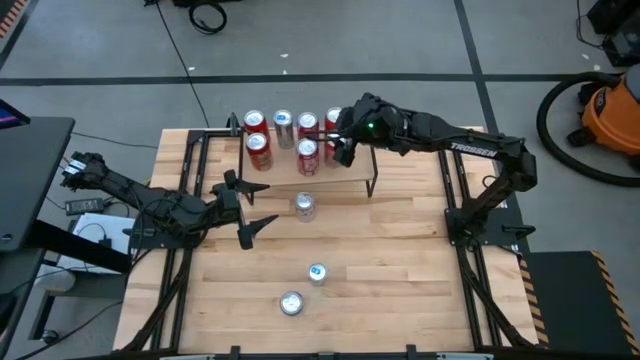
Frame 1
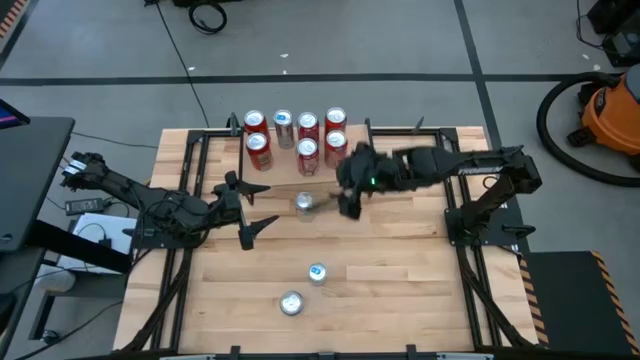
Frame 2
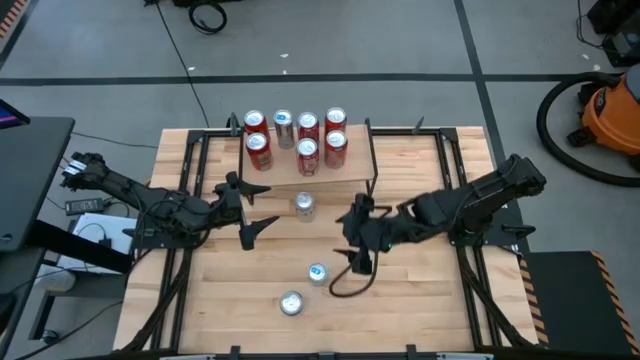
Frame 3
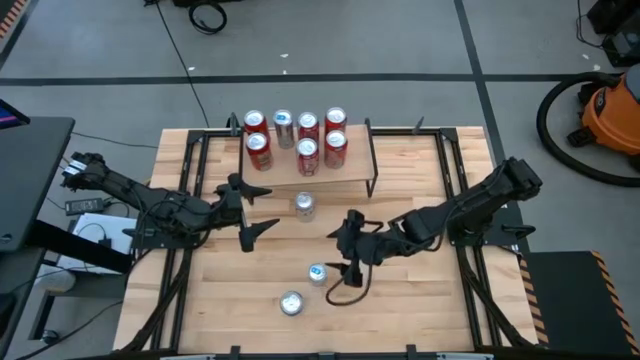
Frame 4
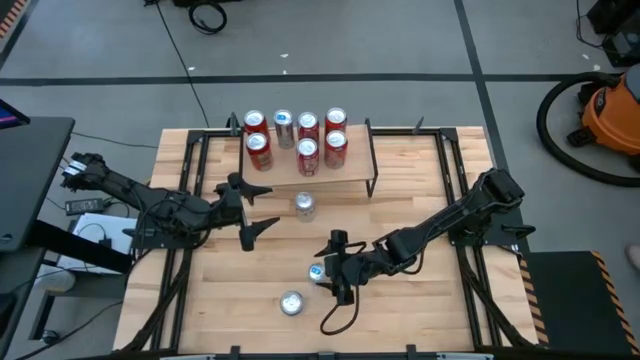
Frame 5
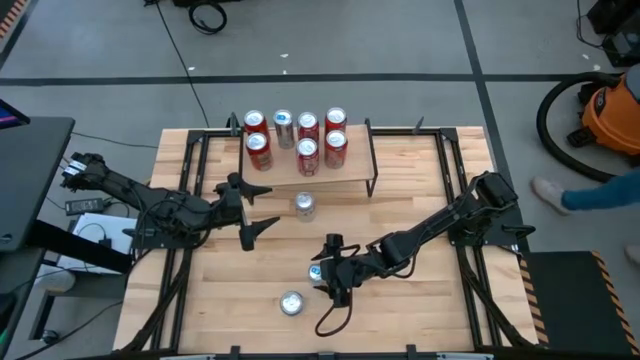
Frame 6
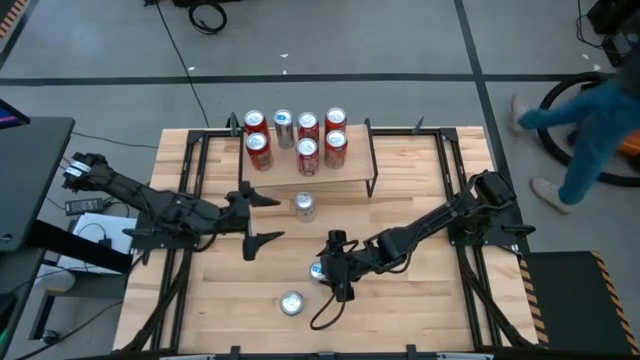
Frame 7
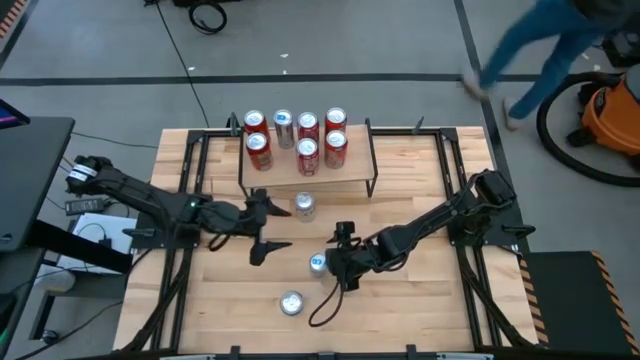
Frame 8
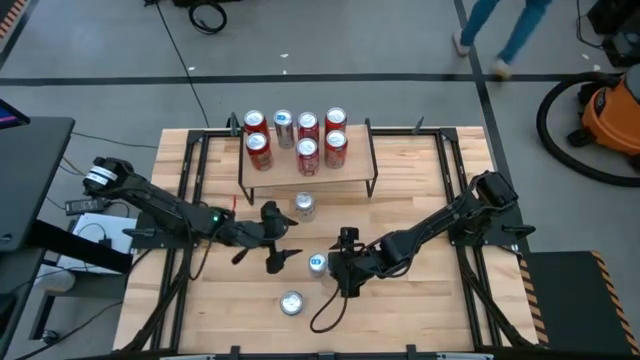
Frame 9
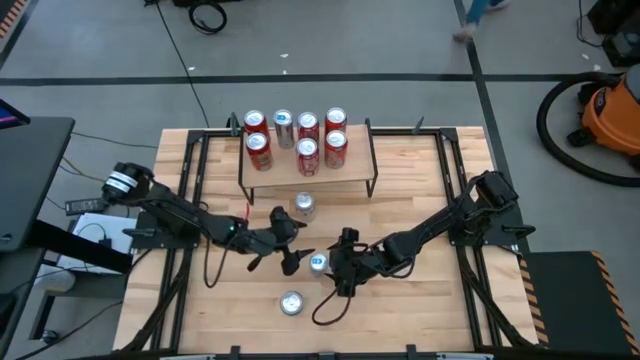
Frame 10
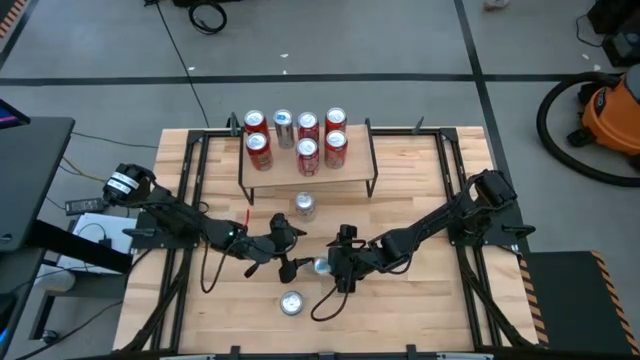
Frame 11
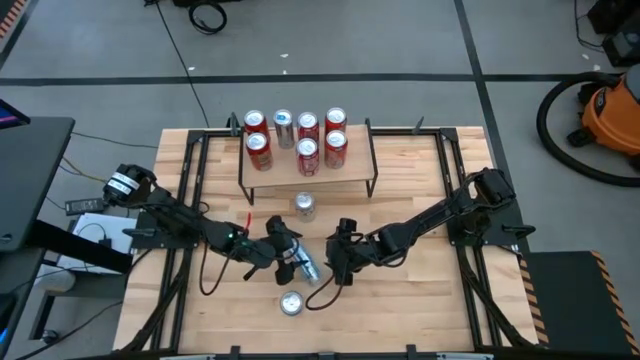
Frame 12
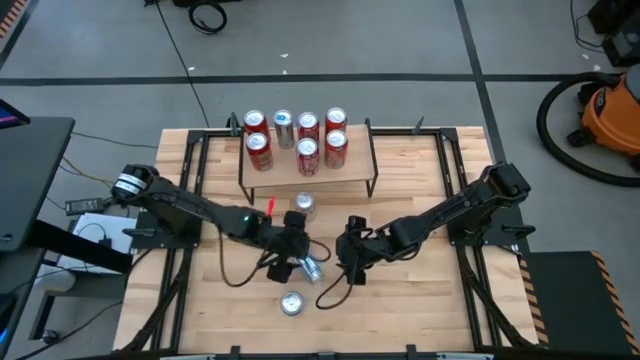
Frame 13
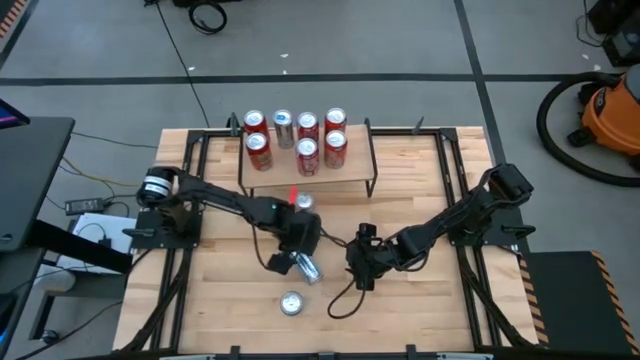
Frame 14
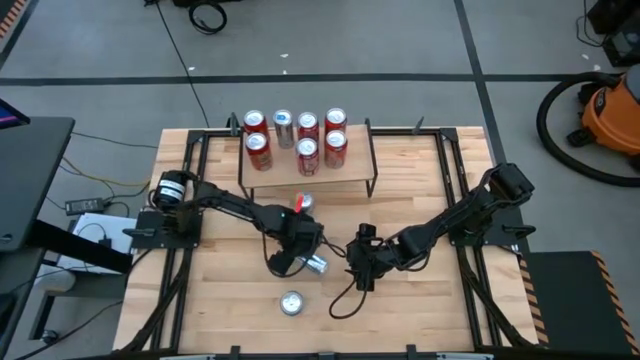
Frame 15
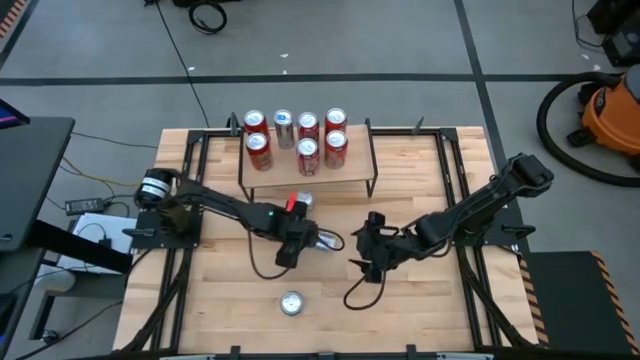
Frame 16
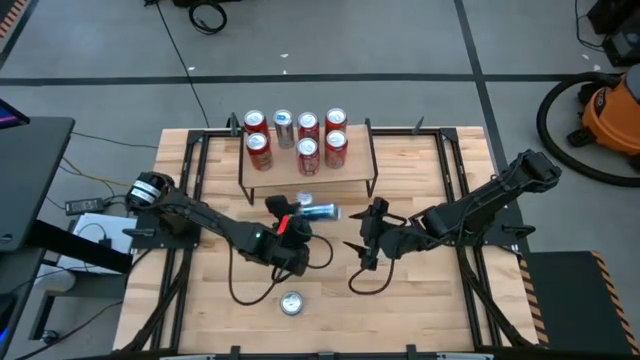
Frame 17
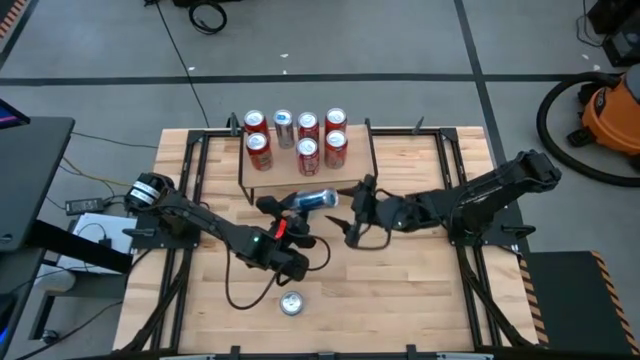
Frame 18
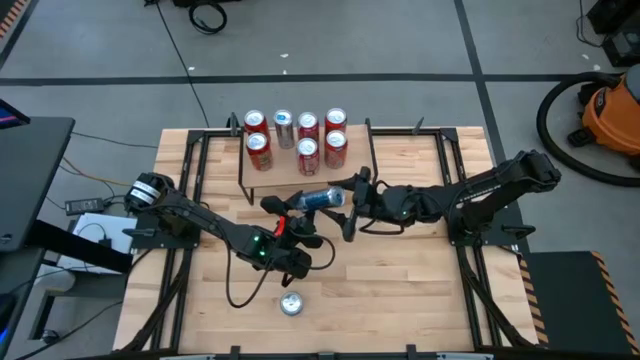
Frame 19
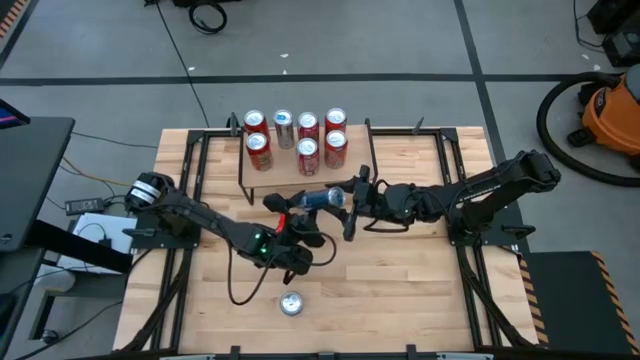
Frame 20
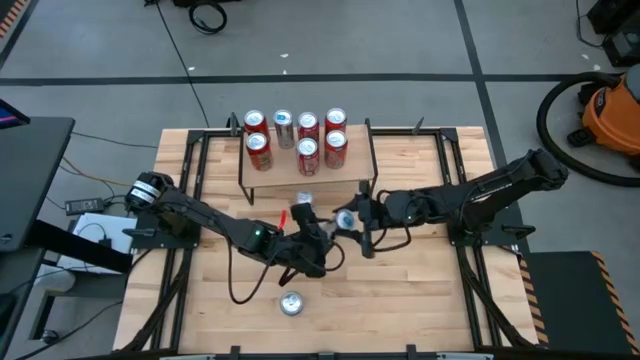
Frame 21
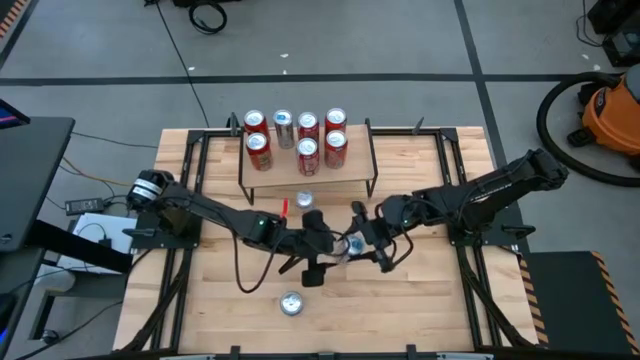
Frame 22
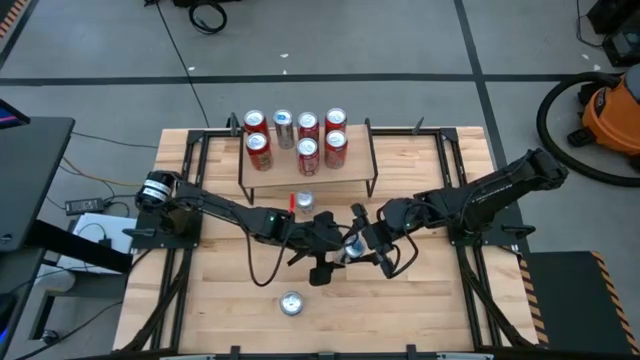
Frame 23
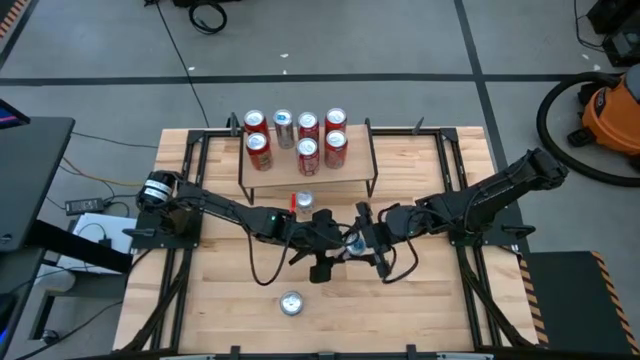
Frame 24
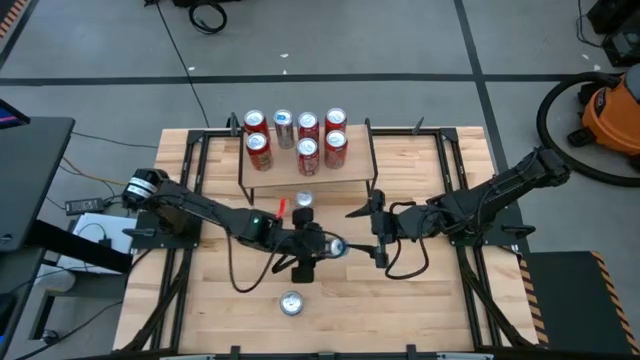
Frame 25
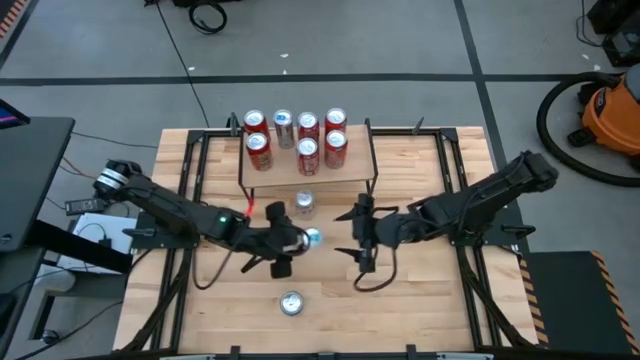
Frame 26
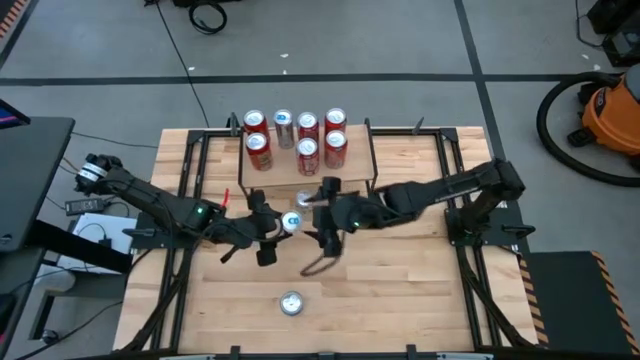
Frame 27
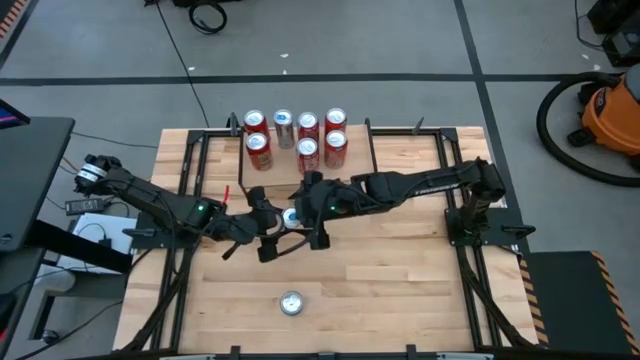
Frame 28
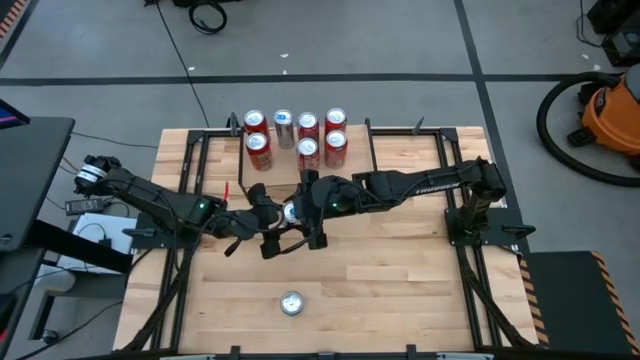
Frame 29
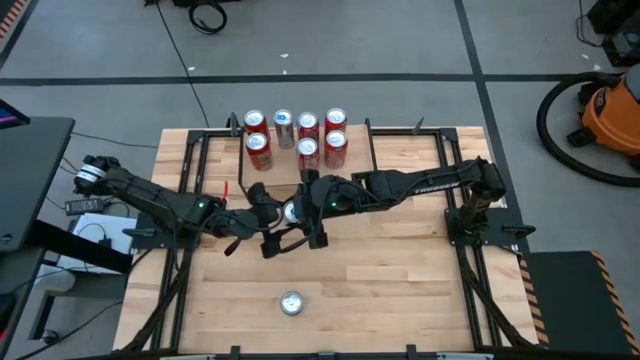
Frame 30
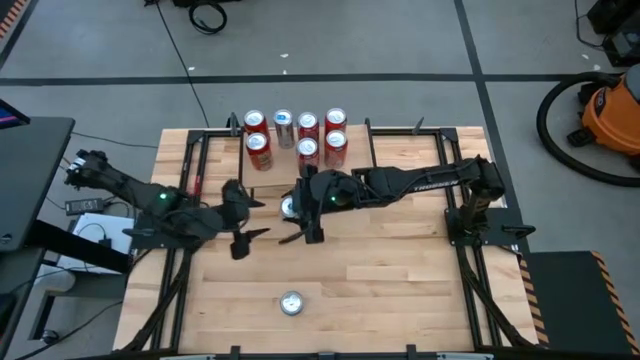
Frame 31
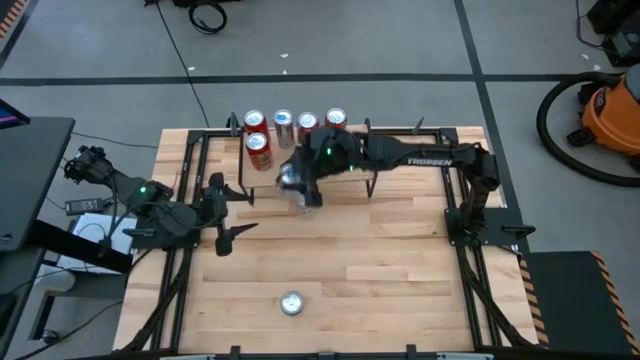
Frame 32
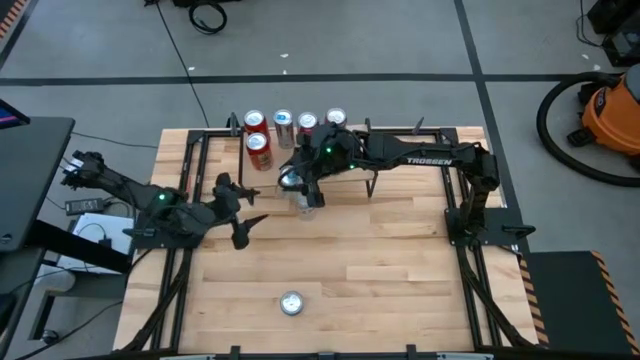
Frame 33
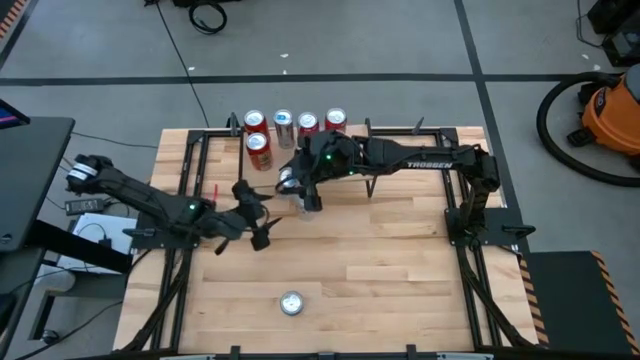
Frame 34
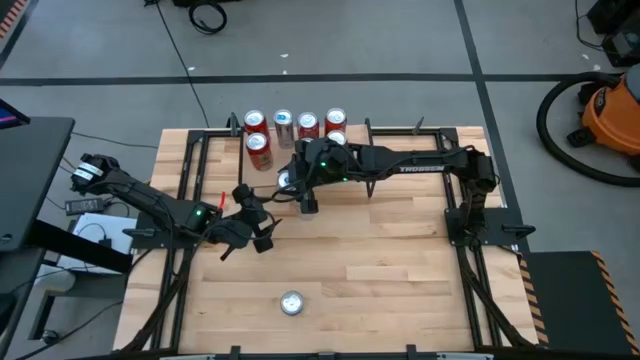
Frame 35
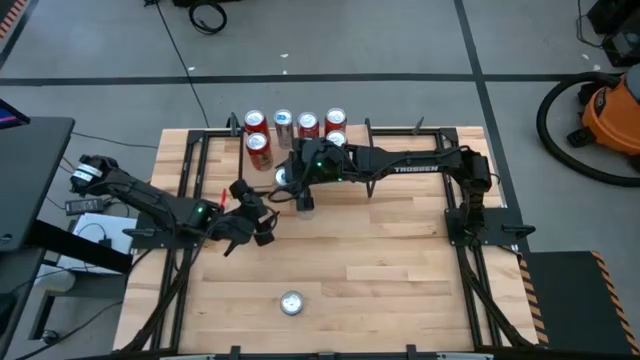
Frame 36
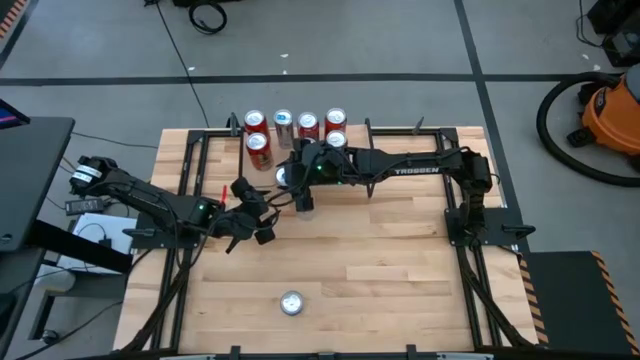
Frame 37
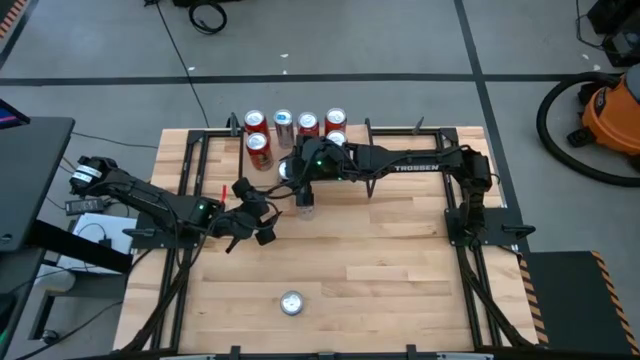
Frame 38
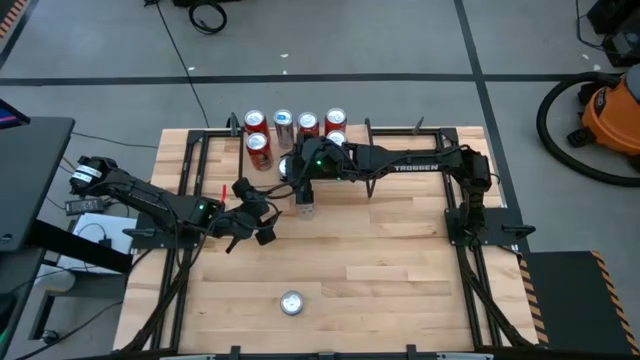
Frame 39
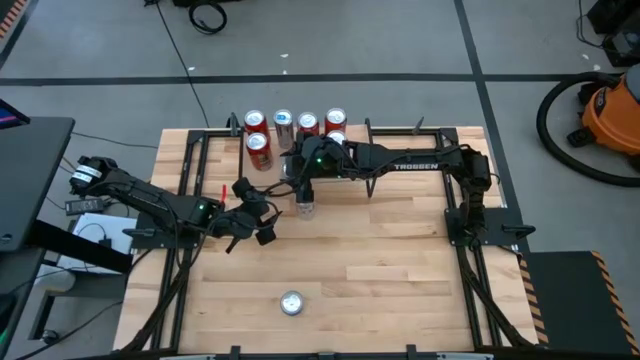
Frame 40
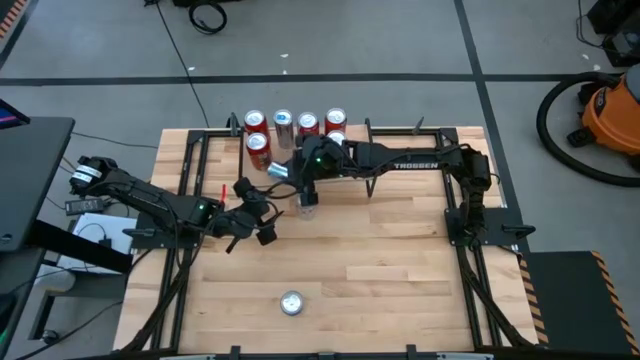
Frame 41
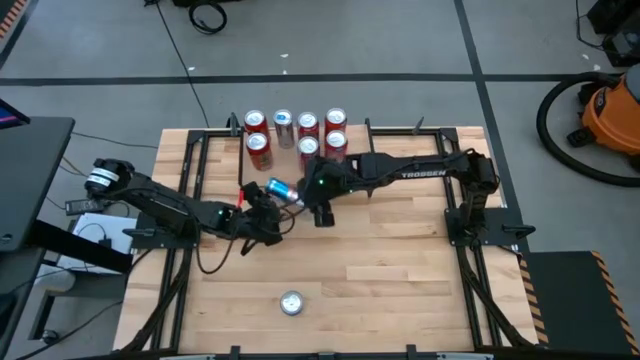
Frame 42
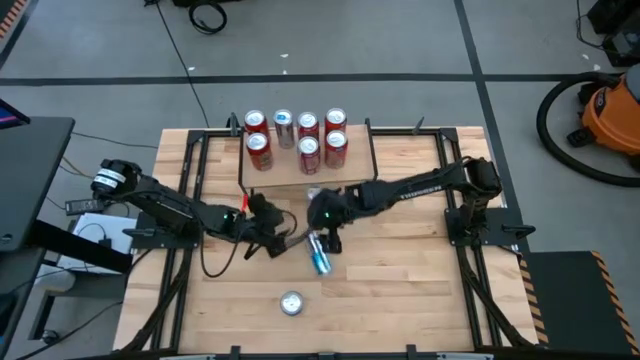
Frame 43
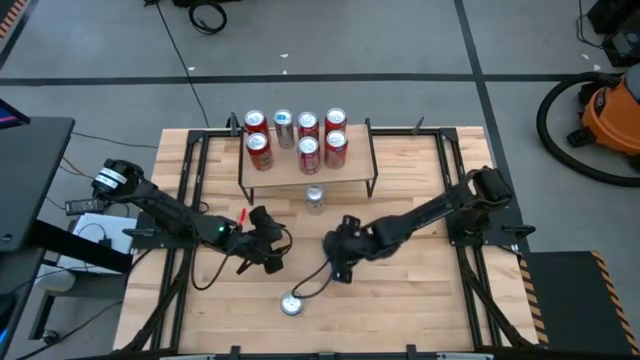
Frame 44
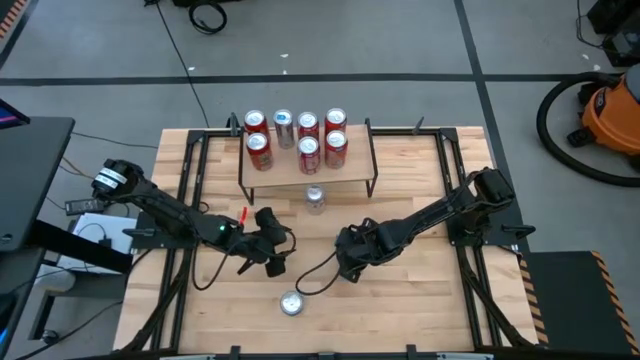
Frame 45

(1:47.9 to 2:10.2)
Task: Place canned beverage on shelf
Put the blue soda can on the shelf
